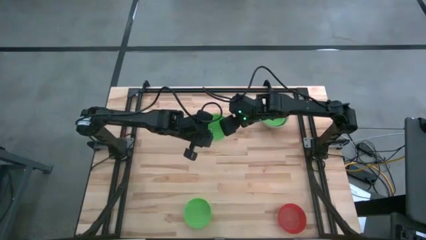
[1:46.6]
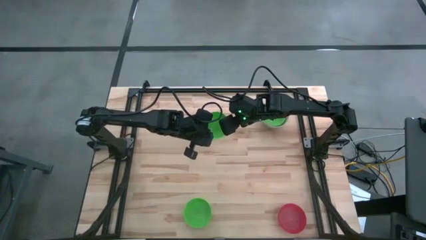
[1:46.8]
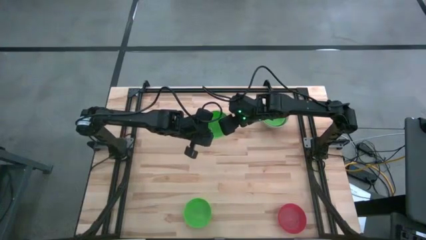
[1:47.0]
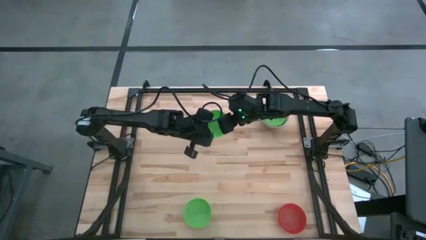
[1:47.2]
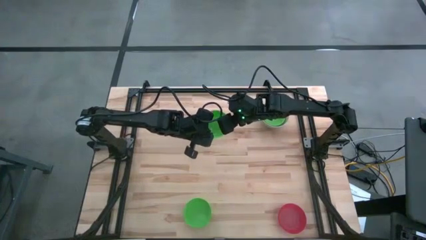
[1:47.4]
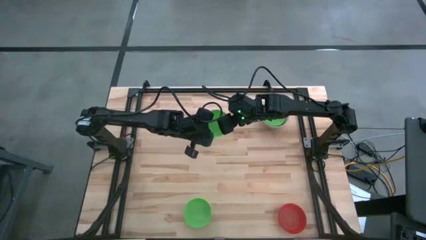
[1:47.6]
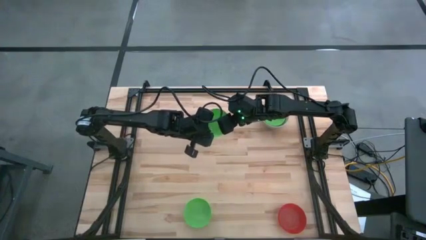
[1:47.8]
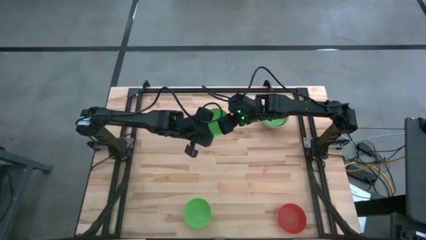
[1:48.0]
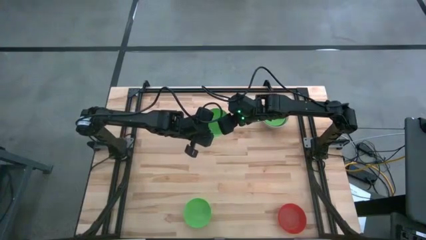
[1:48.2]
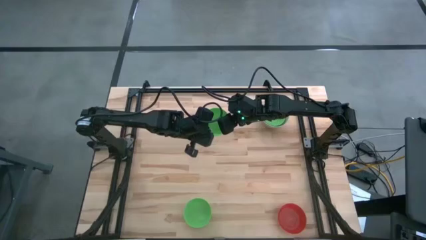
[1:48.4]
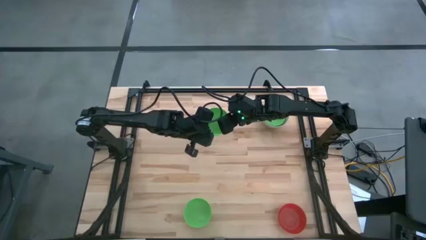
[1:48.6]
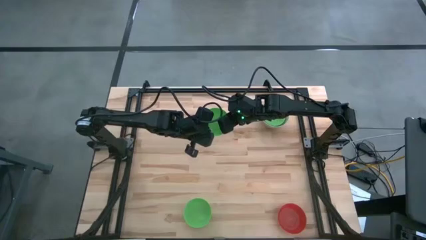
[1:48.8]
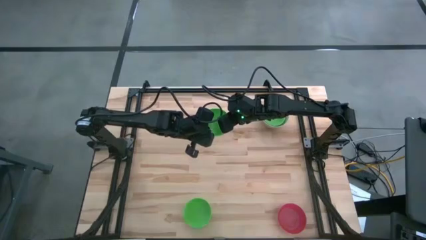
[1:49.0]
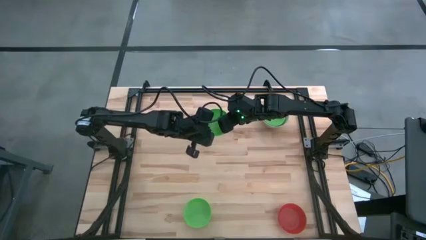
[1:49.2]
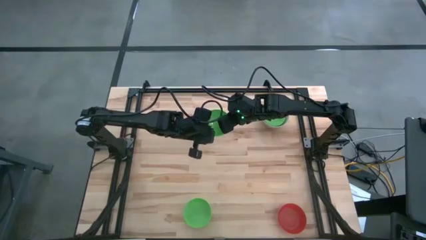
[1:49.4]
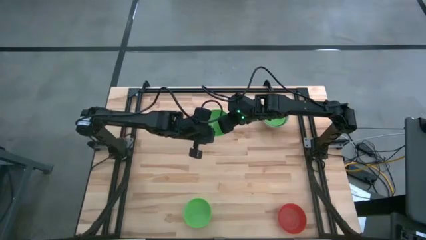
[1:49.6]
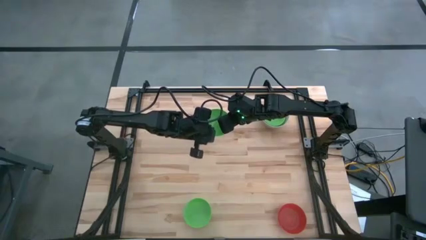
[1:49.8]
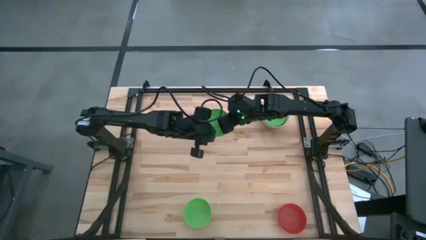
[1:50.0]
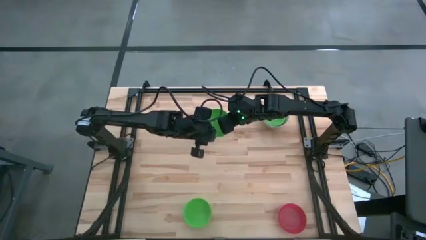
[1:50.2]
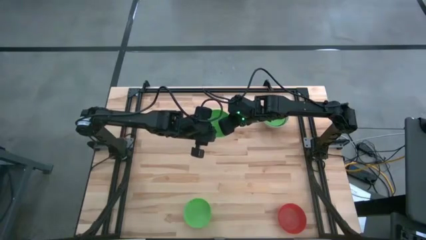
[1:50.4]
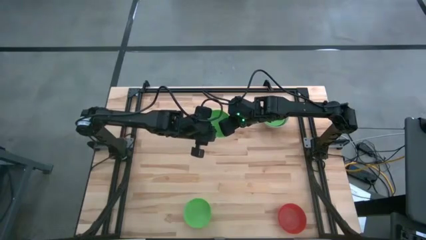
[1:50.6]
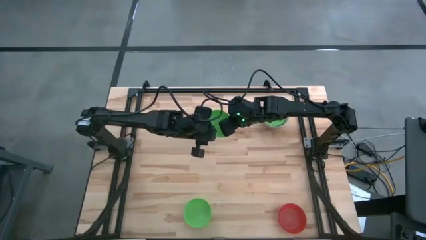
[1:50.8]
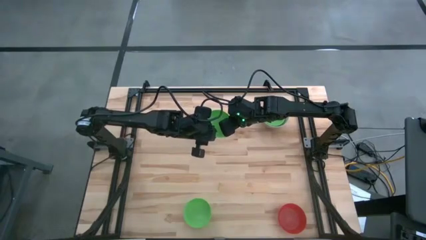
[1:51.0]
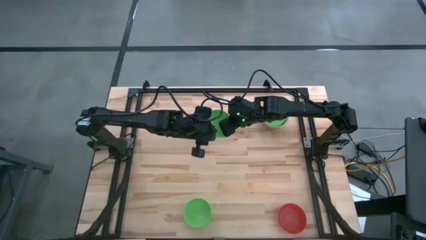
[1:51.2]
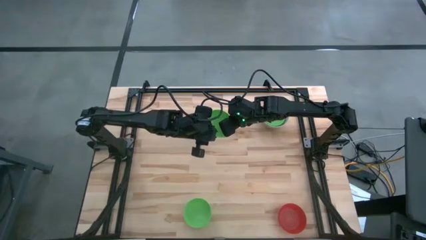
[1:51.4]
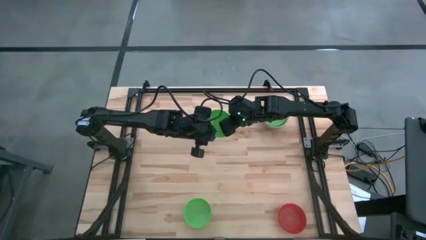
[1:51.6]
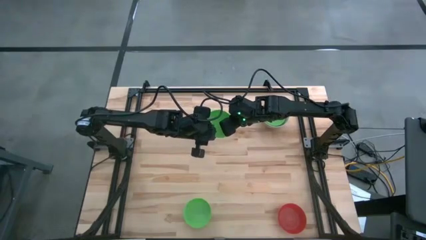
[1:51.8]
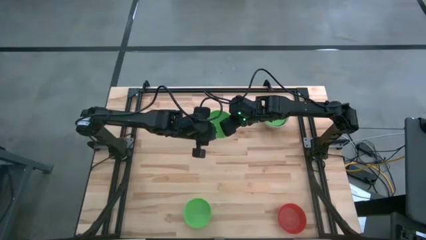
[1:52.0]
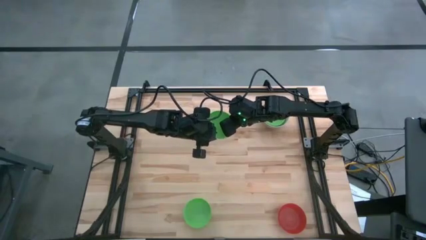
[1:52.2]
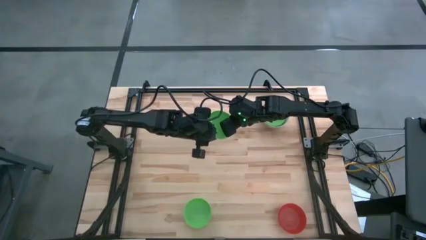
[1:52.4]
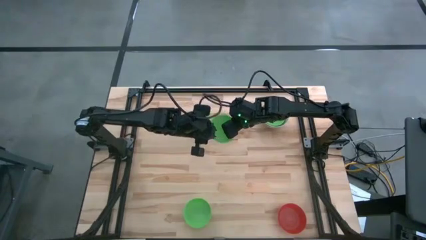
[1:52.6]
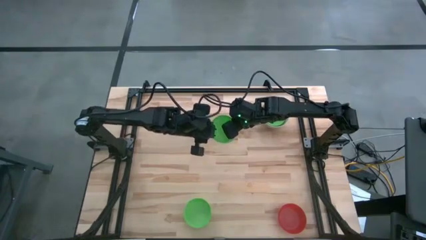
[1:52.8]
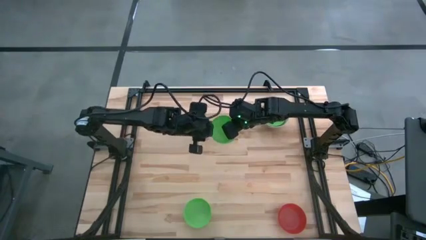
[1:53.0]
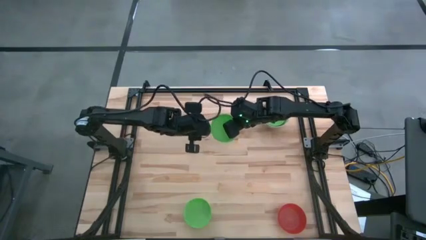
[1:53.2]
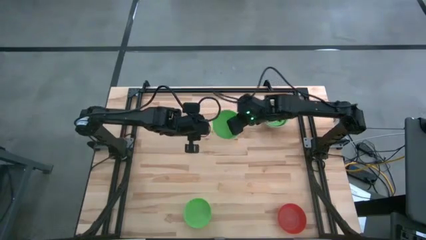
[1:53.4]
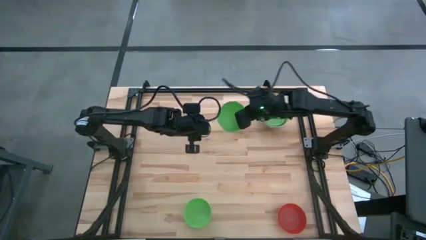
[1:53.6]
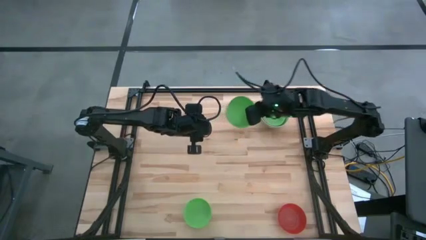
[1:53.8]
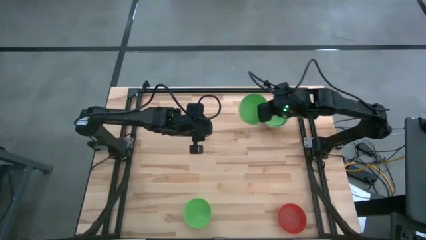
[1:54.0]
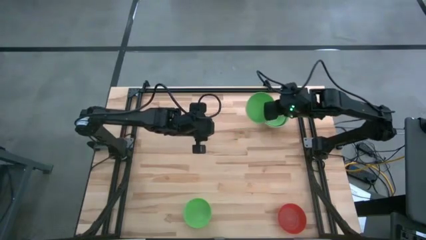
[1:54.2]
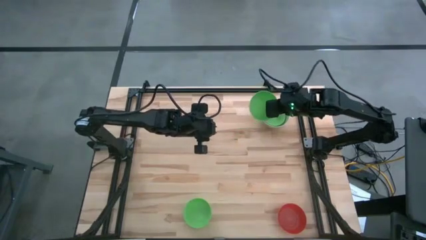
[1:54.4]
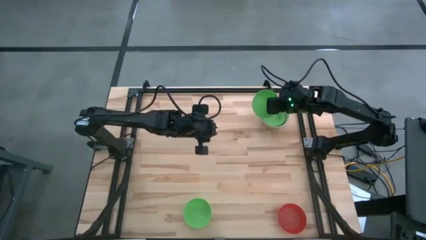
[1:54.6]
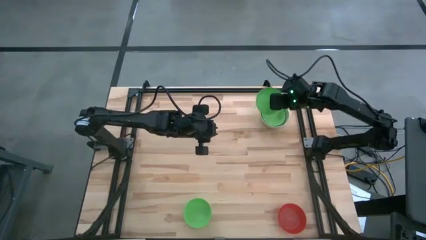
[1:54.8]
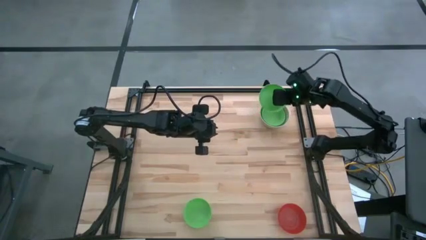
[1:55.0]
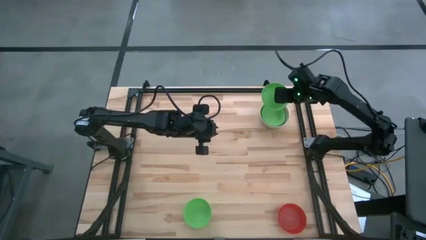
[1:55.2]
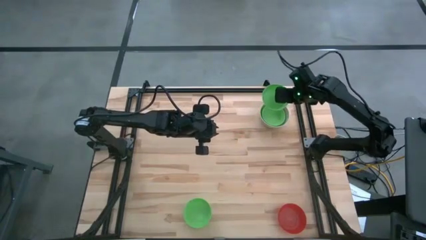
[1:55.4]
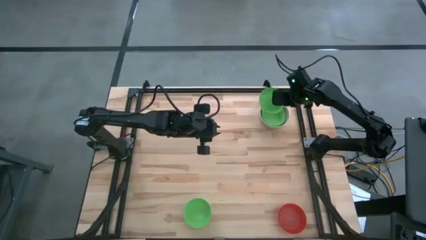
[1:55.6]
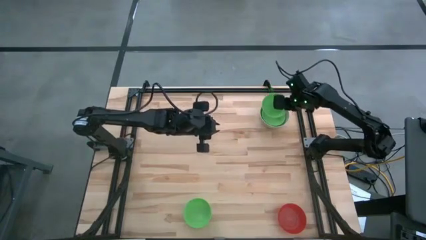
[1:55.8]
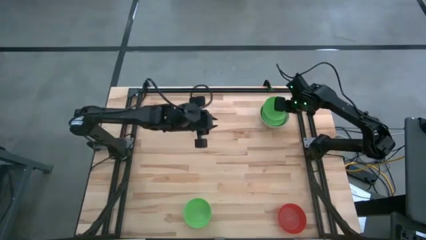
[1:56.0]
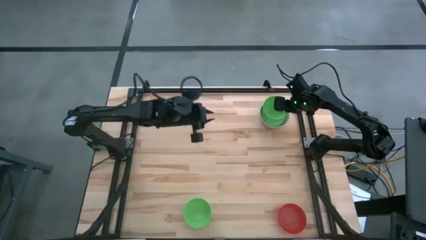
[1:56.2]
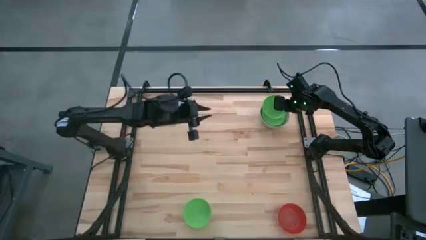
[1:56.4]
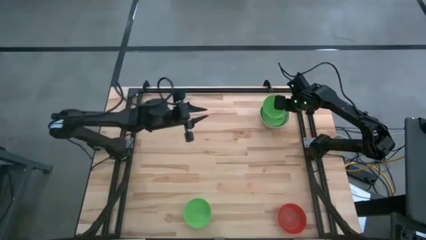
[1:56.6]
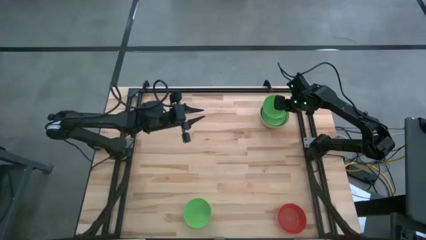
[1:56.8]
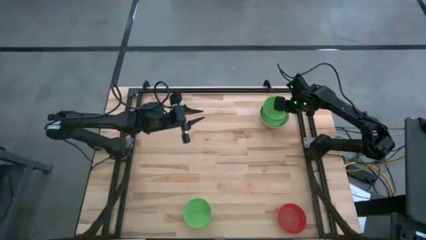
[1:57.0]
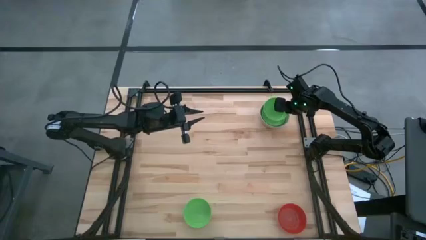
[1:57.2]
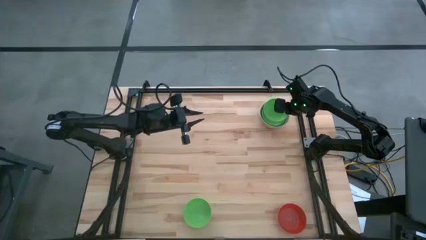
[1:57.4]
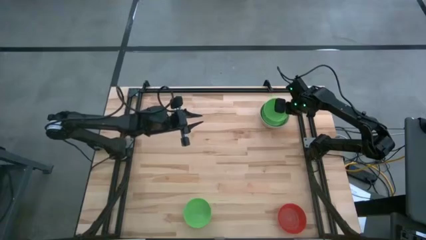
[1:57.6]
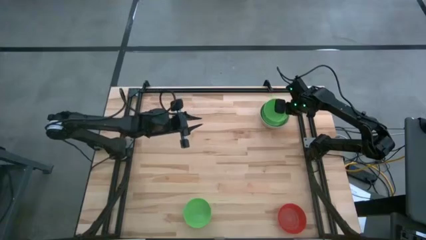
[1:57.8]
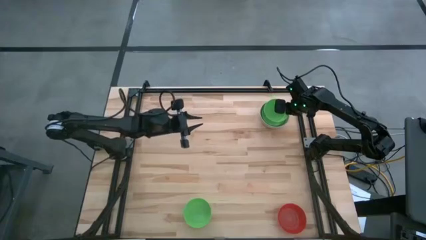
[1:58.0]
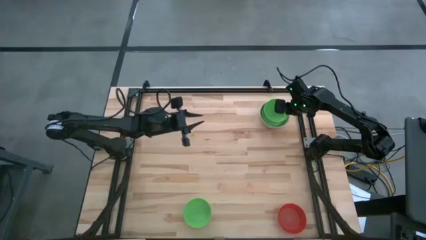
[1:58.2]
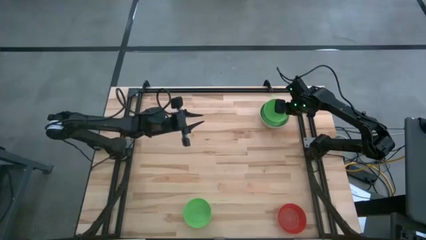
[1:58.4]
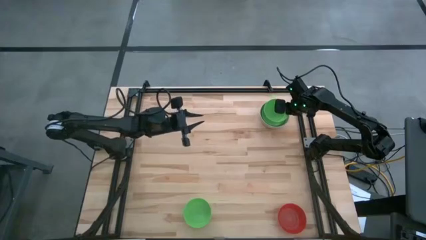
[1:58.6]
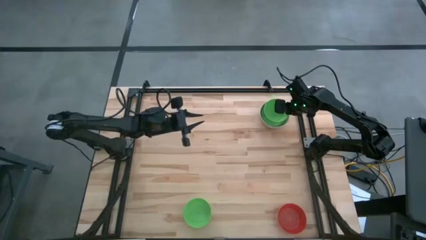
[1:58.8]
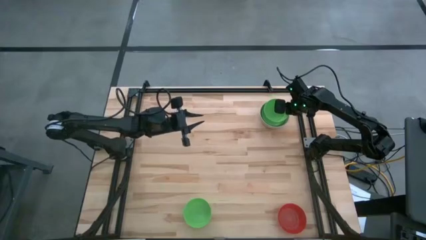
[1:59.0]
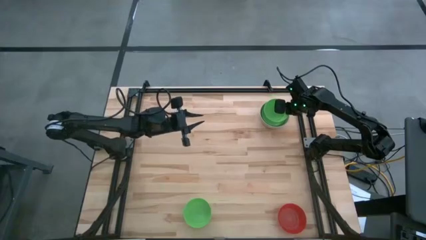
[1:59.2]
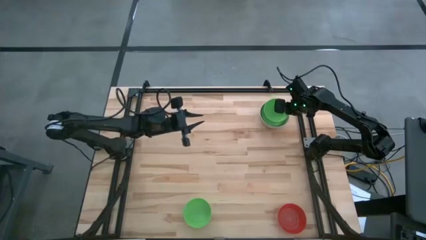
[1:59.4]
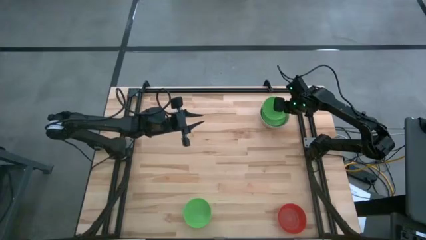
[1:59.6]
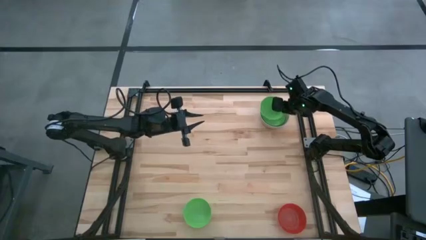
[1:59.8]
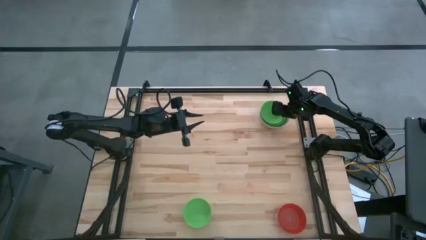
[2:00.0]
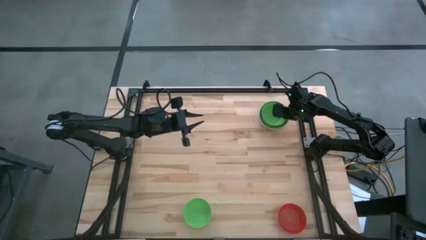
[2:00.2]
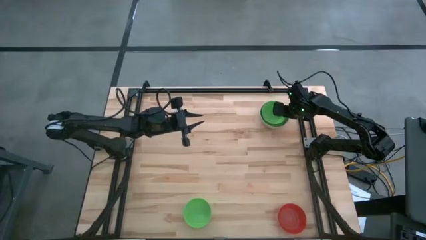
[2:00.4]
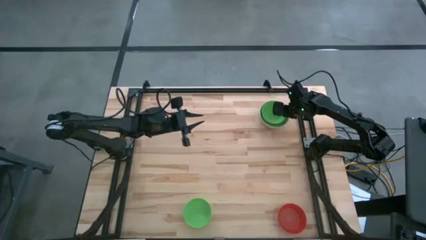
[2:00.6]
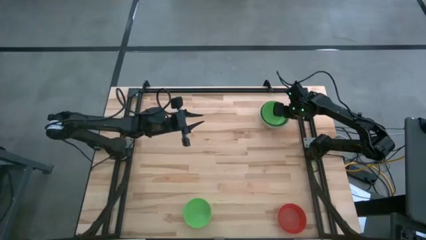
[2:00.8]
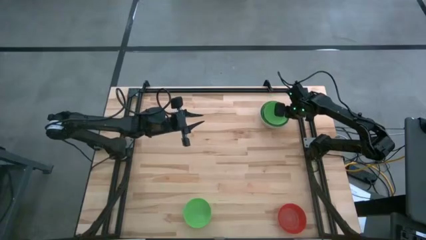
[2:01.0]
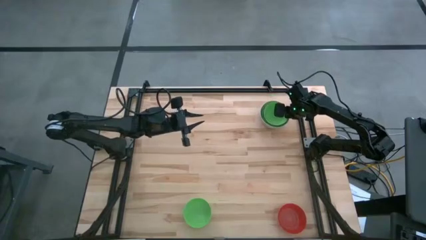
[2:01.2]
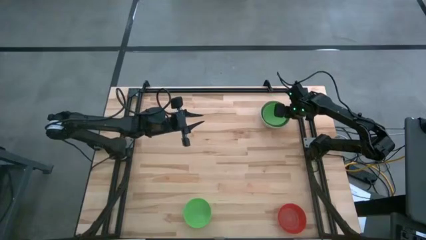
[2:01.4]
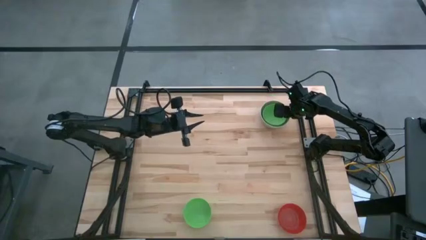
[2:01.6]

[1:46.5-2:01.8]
Stack the top green bowl on top of the green bowl
